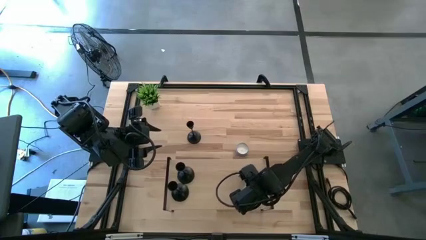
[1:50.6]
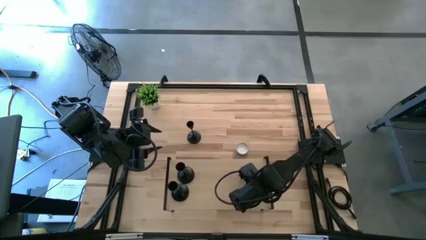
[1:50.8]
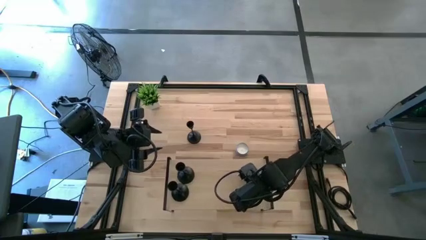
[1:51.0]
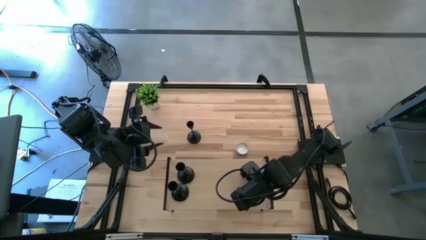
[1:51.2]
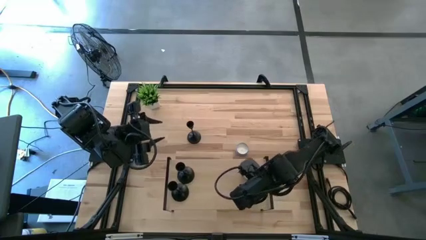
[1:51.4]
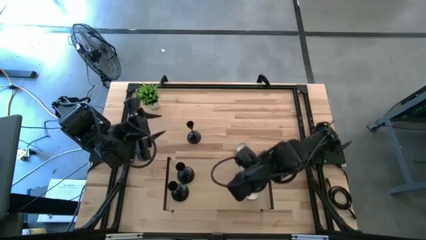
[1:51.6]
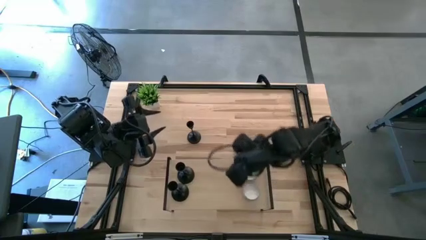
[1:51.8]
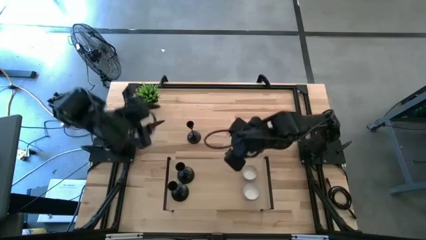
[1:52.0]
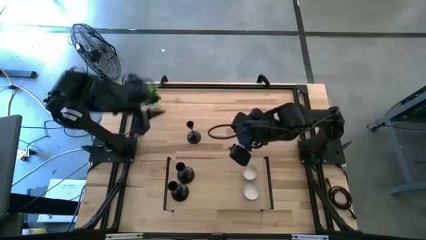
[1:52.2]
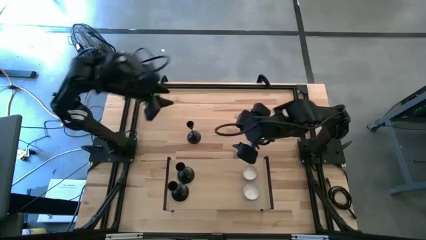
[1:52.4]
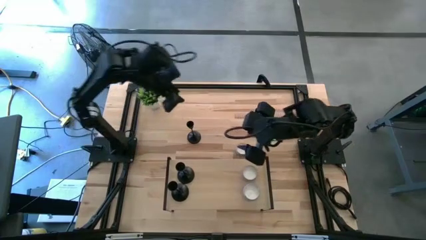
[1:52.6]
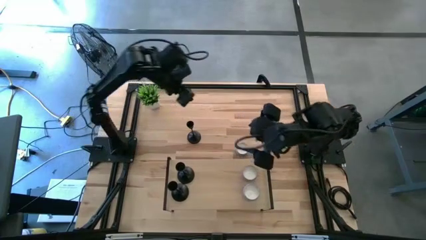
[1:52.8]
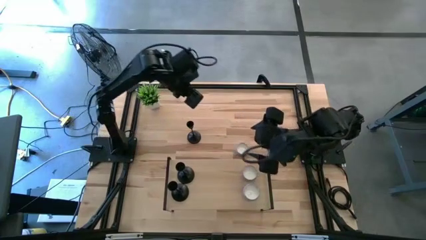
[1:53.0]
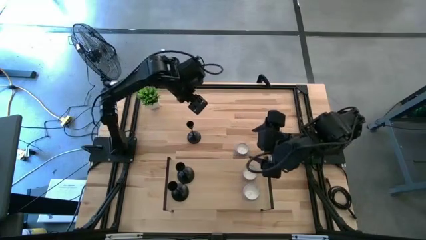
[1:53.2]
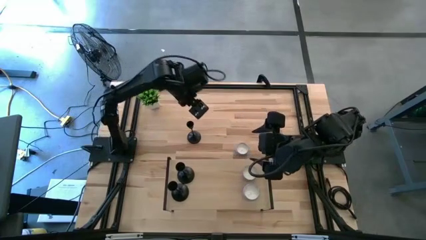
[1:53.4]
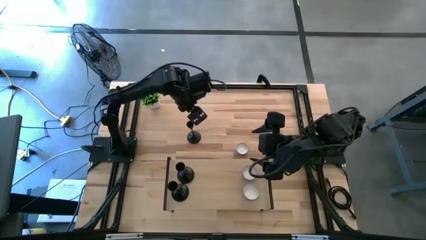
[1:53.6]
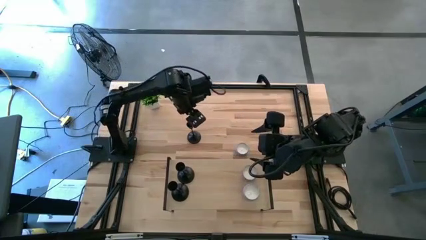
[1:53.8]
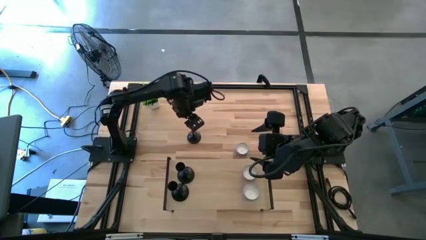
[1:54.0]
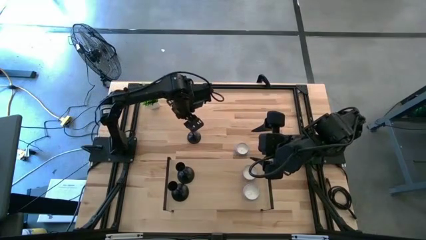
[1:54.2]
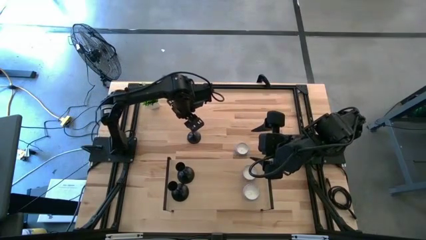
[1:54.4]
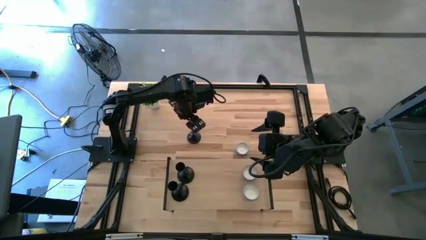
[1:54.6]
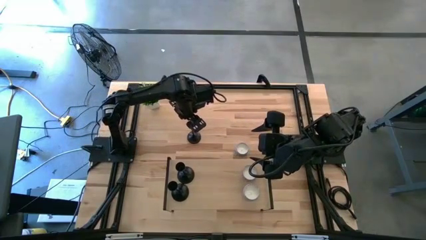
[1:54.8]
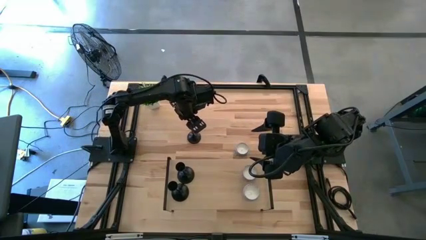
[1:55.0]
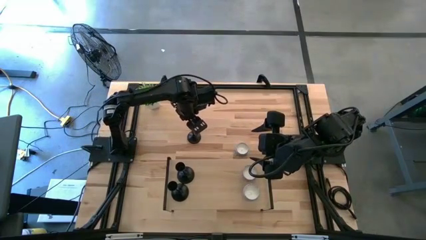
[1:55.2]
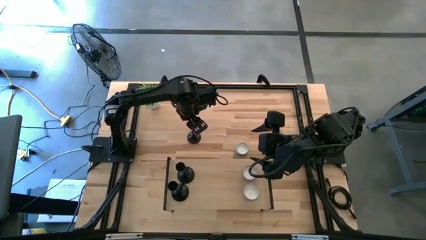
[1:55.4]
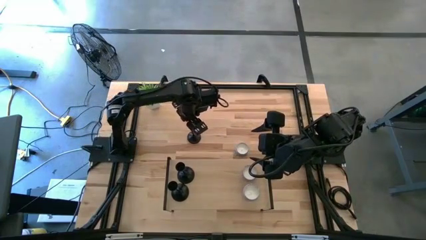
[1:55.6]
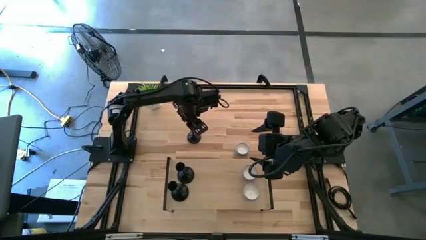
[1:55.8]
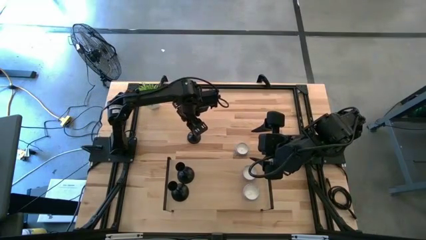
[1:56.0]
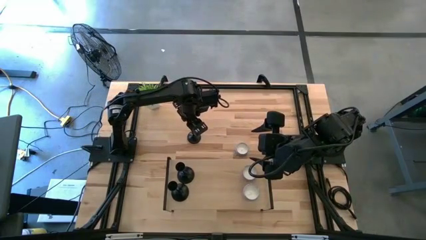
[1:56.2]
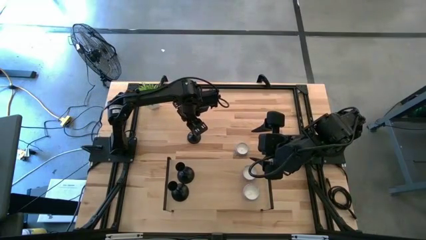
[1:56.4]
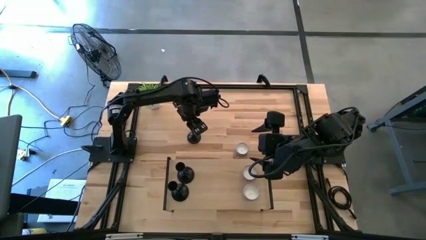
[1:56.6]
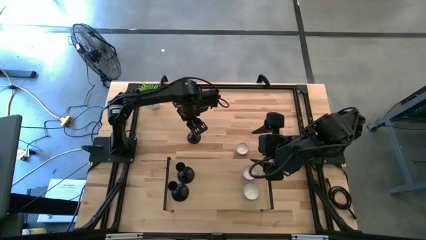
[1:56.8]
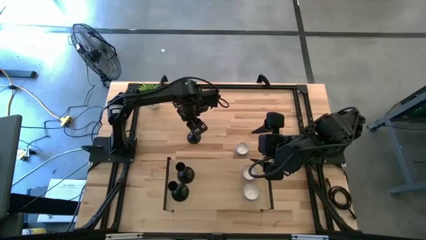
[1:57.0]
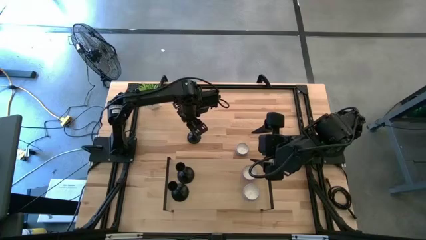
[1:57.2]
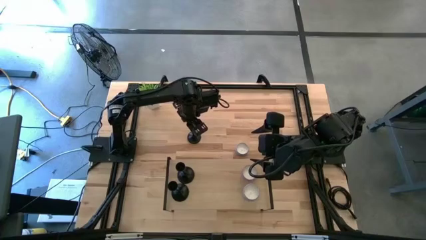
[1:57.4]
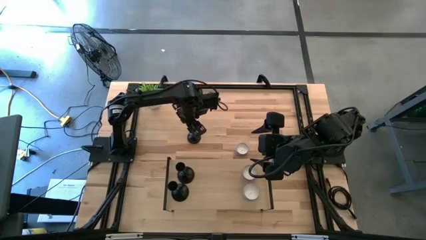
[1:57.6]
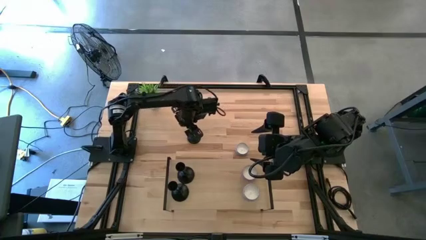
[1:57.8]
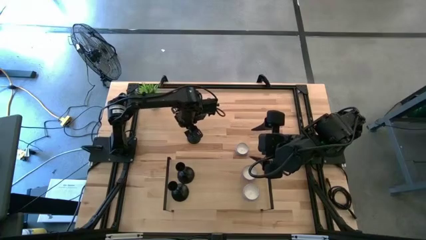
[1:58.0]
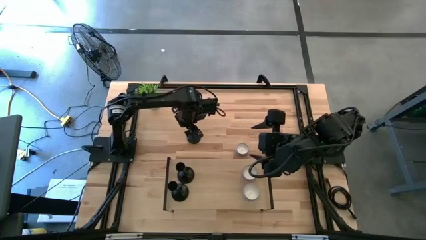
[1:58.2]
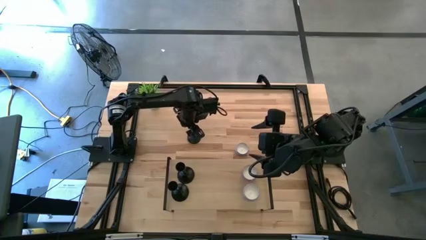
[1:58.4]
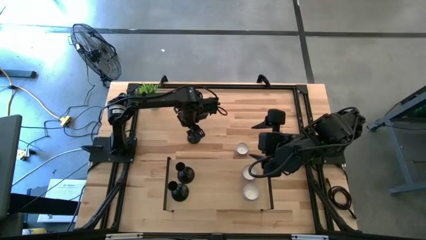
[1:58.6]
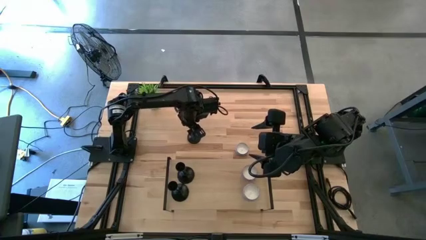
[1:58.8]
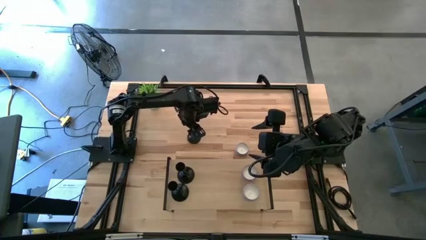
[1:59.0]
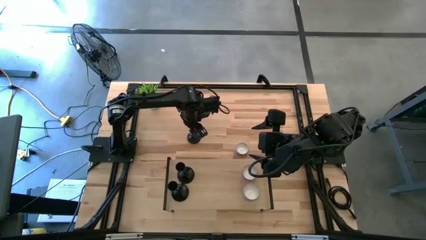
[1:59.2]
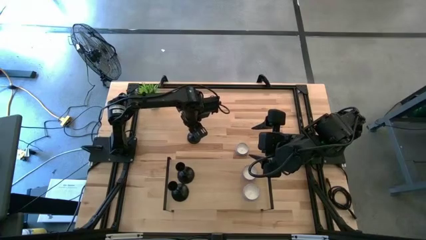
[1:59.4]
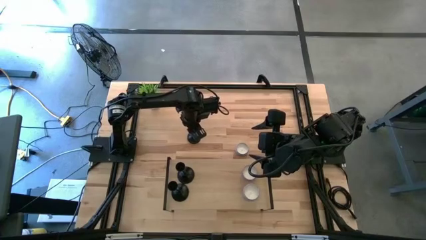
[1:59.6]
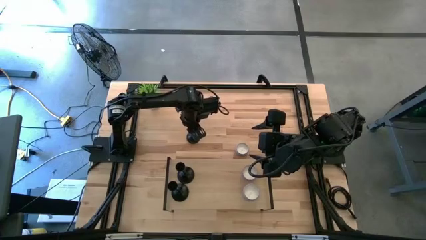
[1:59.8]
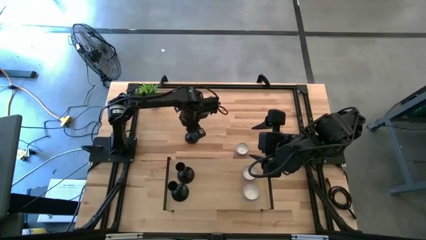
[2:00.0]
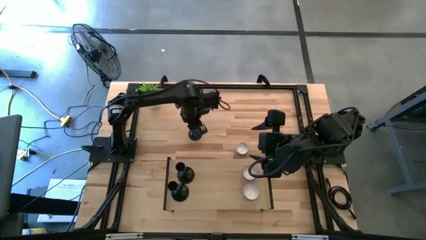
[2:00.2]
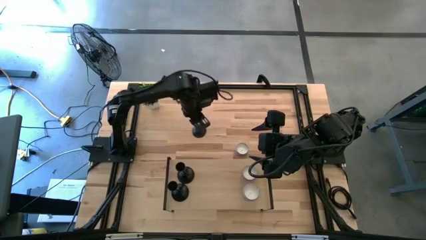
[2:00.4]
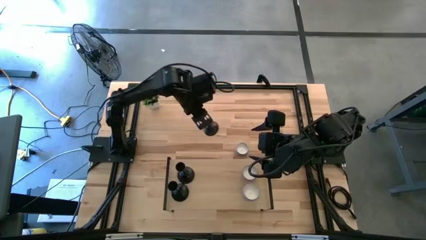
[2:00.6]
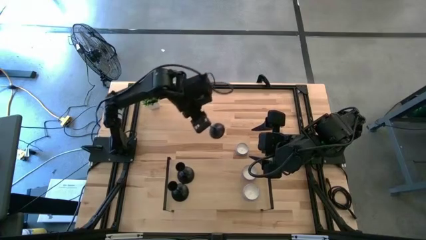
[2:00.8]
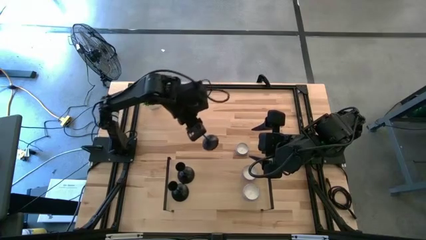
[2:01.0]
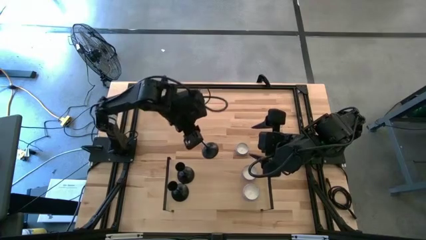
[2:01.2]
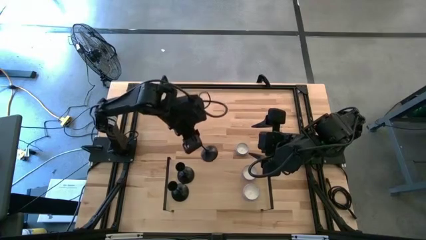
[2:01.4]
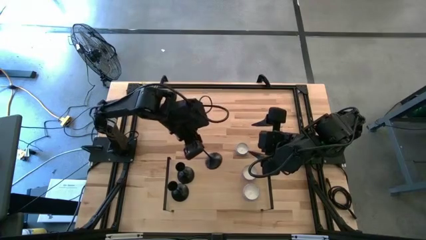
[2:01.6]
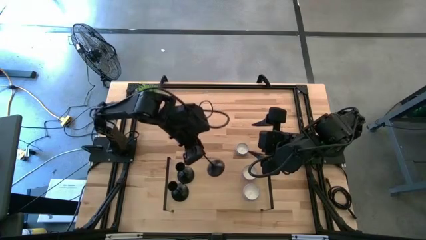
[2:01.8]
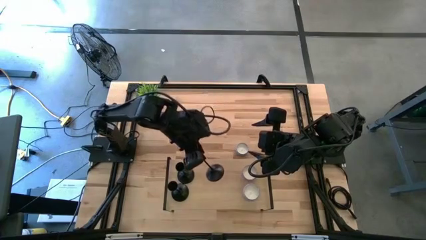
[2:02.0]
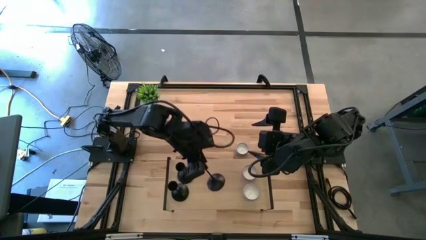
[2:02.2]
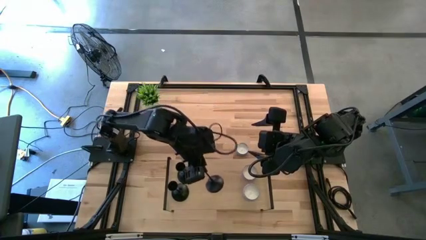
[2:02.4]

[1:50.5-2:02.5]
Task: Pick & Place candle stick holders
Put the black candle holder on the shelf
